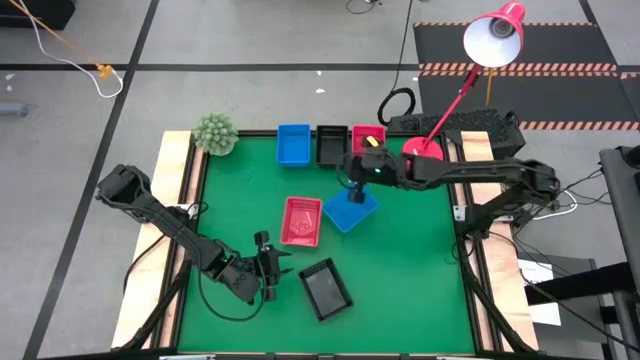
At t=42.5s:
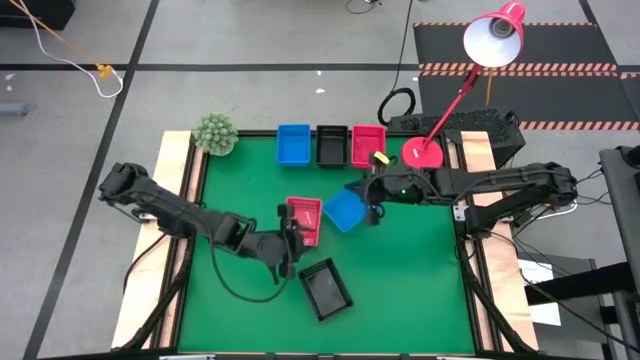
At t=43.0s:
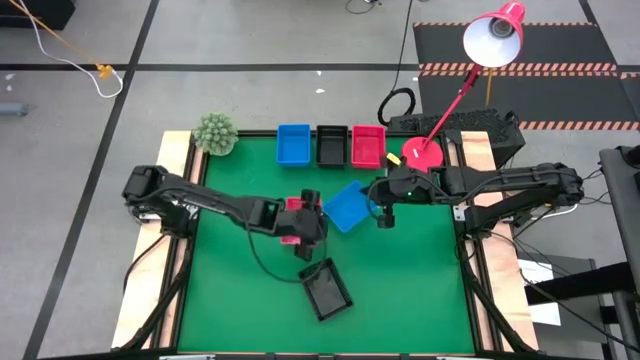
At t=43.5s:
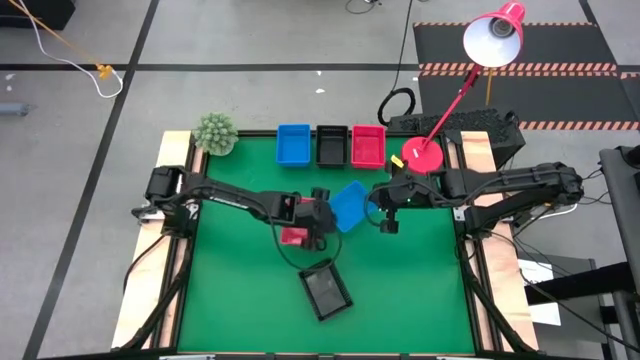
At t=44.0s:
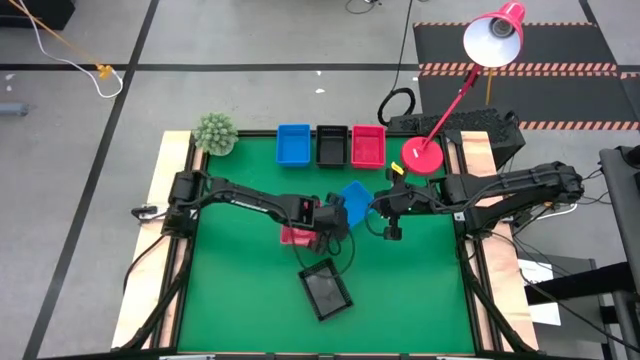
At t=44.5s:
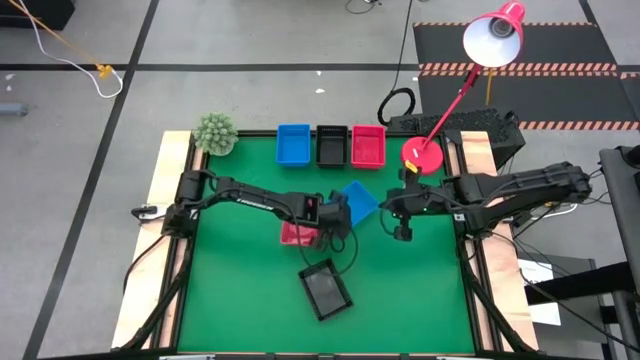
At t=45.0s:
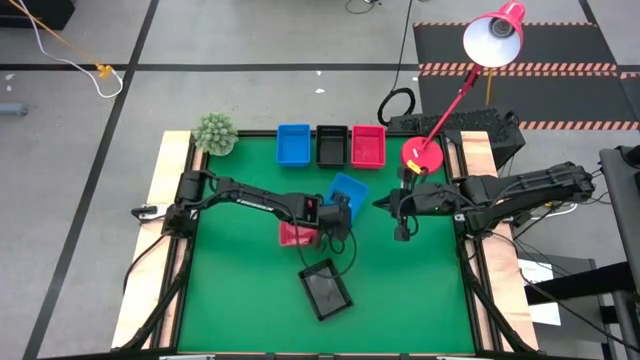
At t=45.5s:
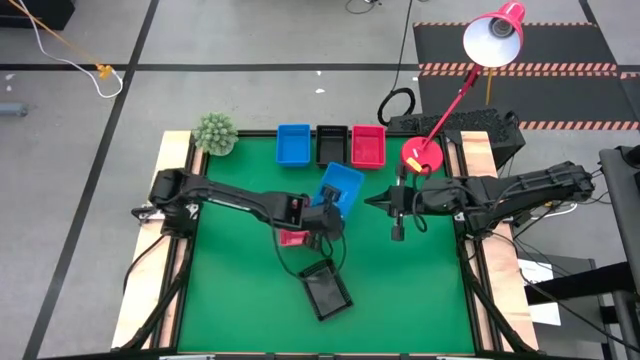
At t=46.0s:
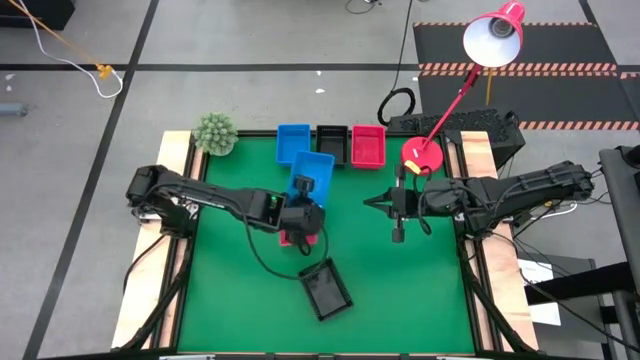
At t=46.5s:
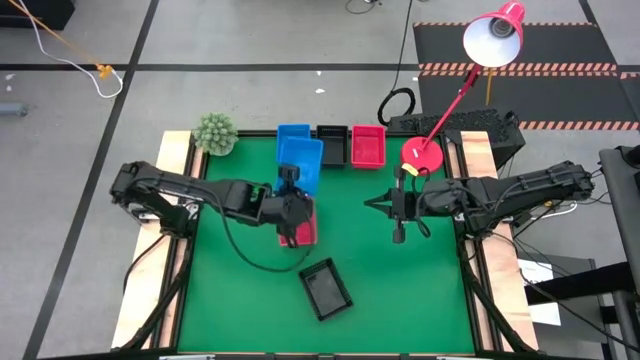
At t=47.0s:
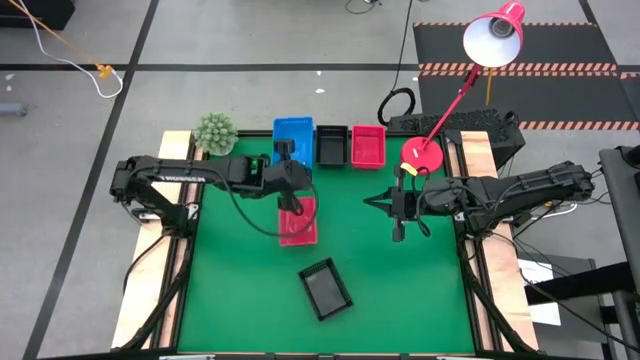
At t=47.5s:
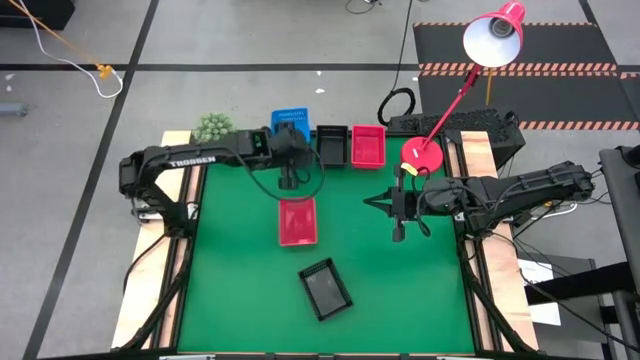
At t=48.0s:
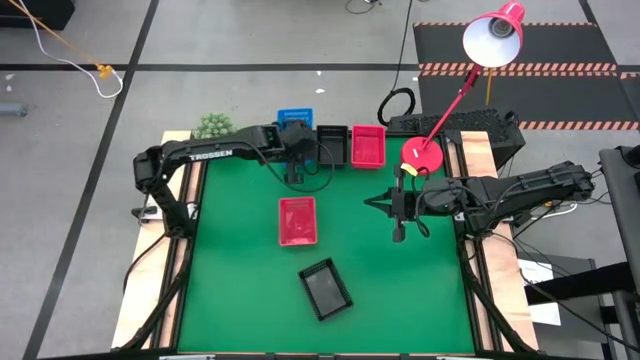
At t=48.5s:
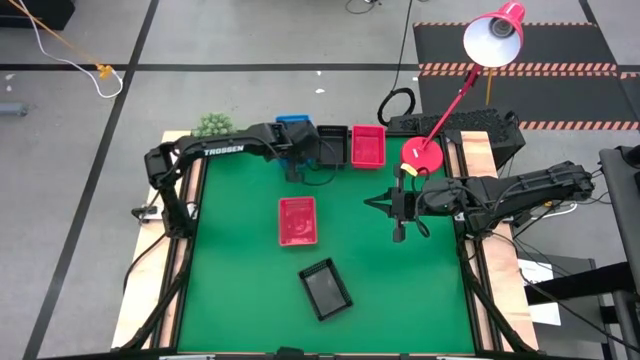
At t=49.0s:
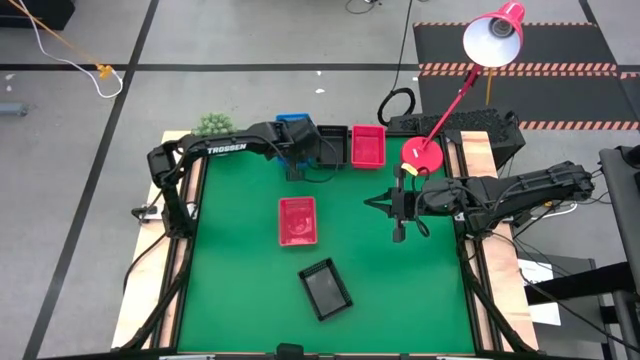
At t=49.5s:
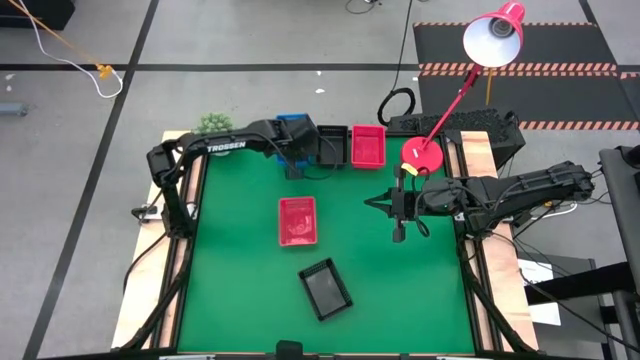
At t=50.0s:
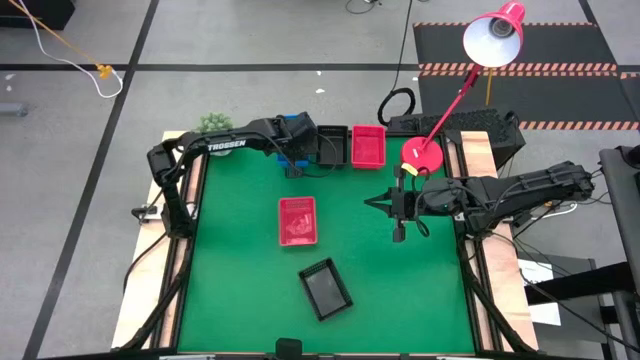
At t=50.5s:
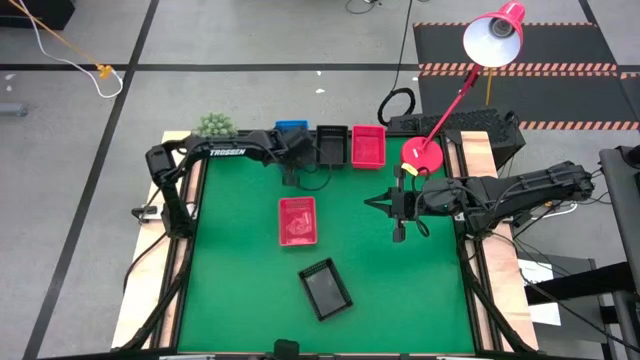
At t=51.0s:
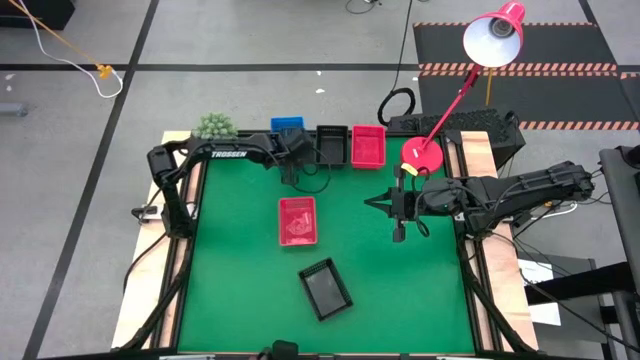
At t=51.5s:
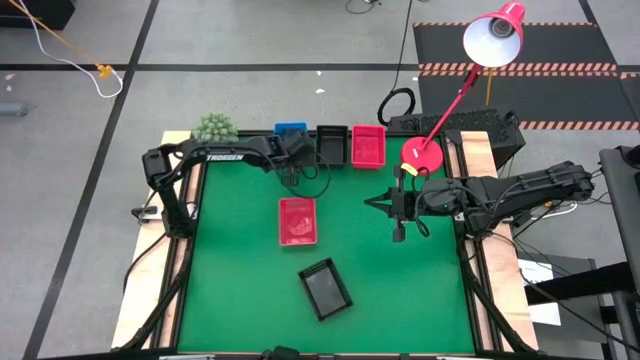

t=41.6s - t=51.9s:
Stack the bottom blue basket on the stacked top blue basket

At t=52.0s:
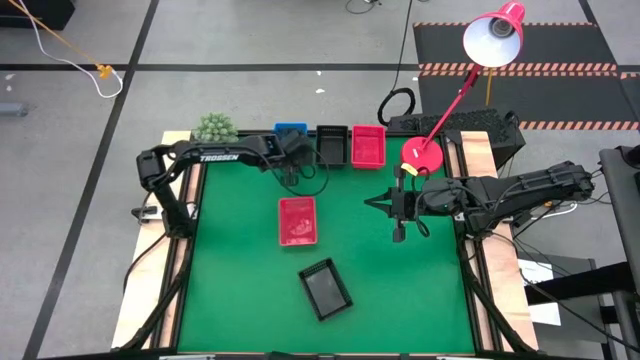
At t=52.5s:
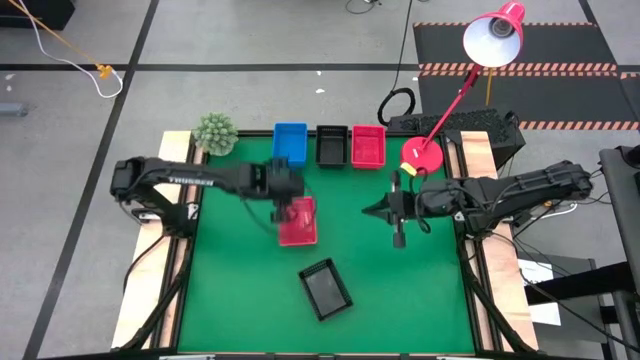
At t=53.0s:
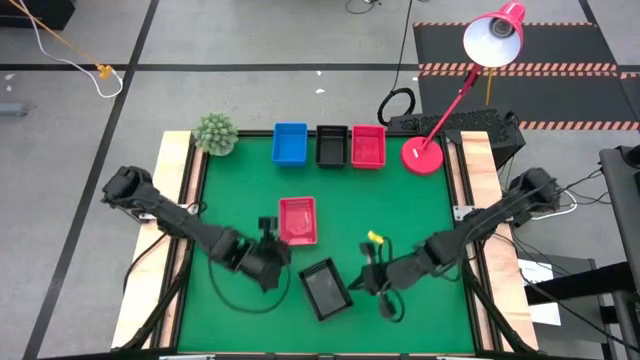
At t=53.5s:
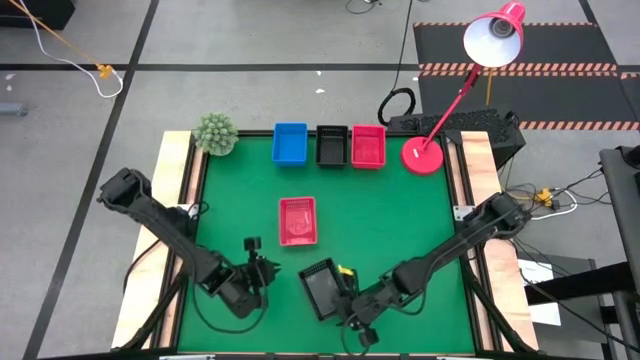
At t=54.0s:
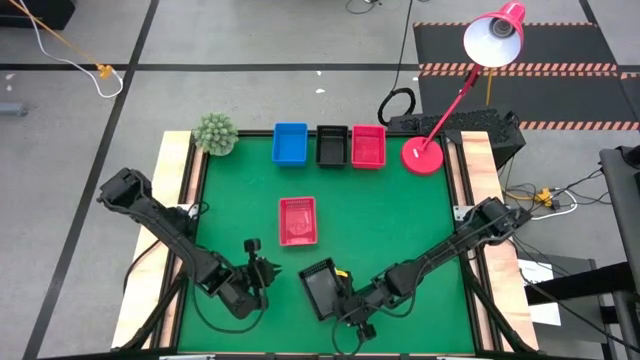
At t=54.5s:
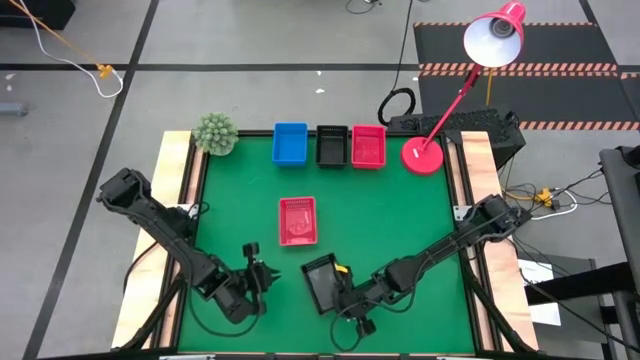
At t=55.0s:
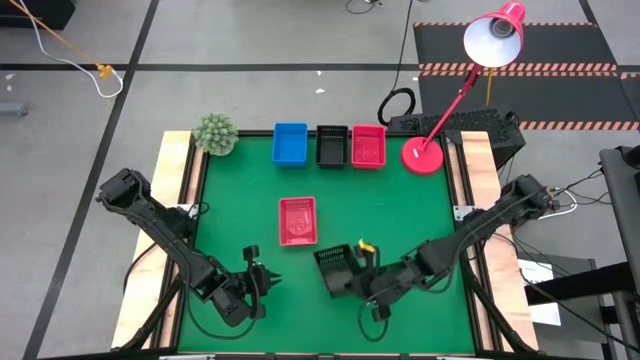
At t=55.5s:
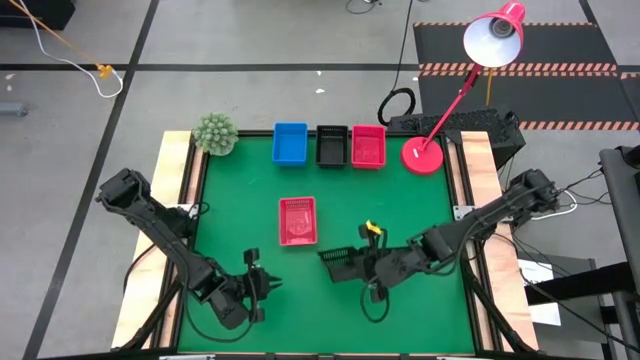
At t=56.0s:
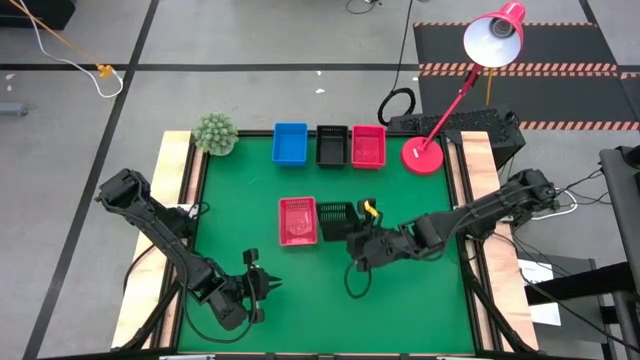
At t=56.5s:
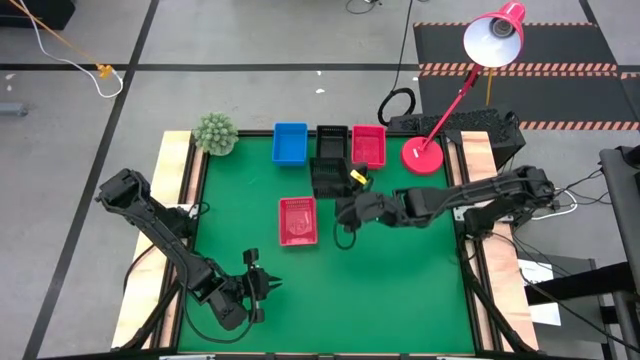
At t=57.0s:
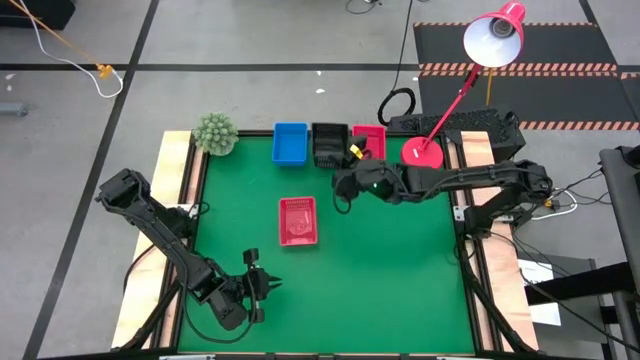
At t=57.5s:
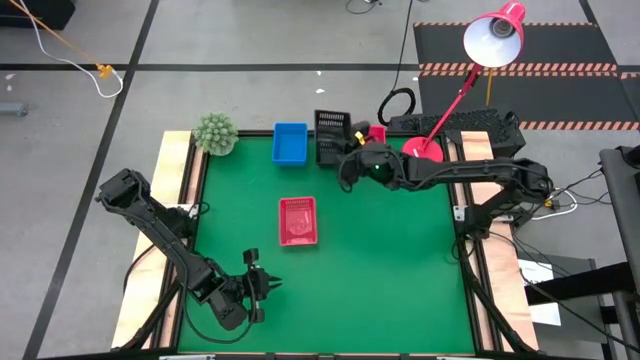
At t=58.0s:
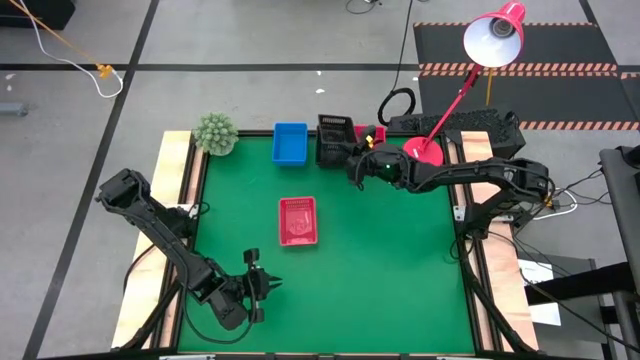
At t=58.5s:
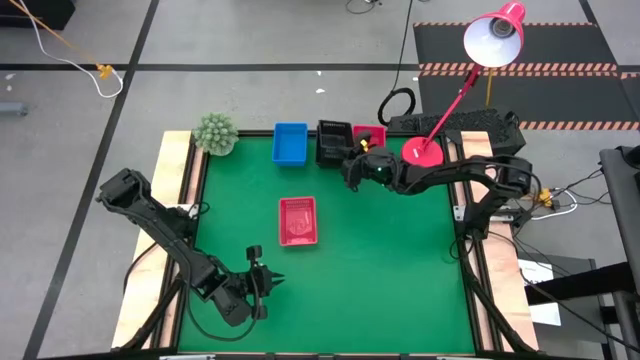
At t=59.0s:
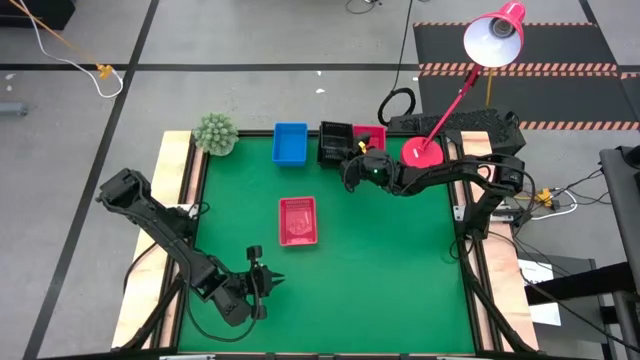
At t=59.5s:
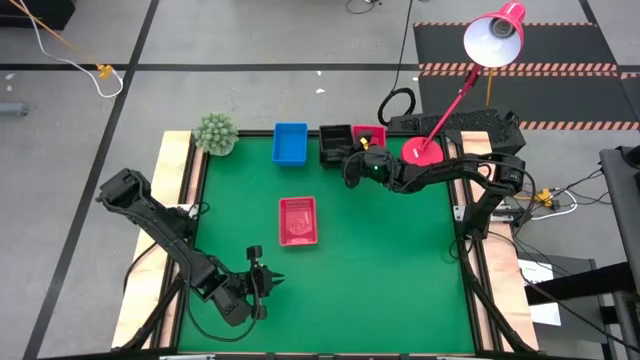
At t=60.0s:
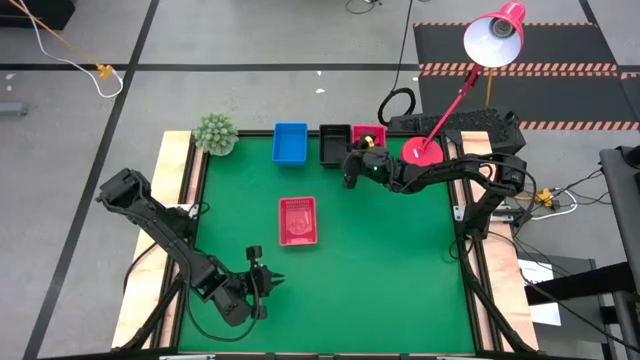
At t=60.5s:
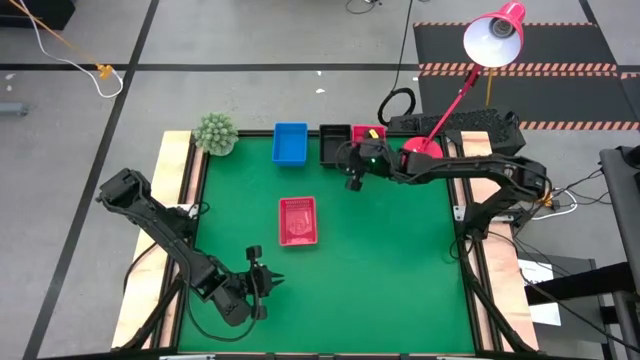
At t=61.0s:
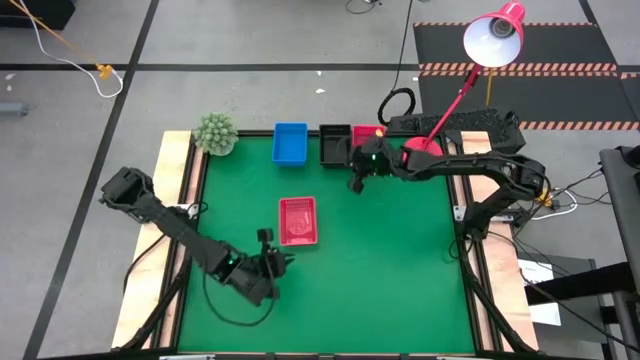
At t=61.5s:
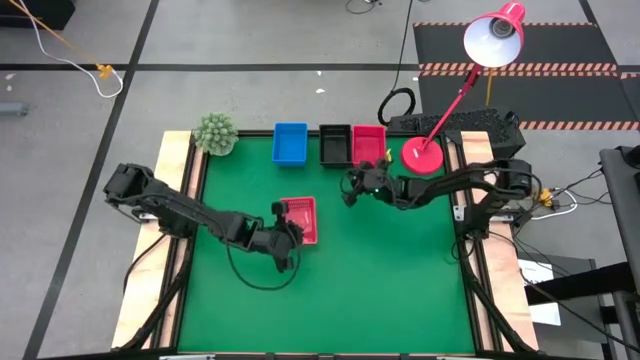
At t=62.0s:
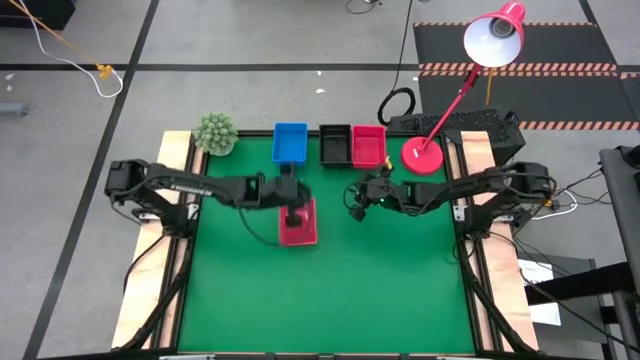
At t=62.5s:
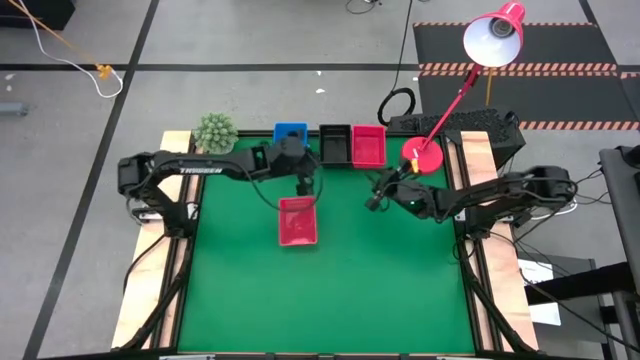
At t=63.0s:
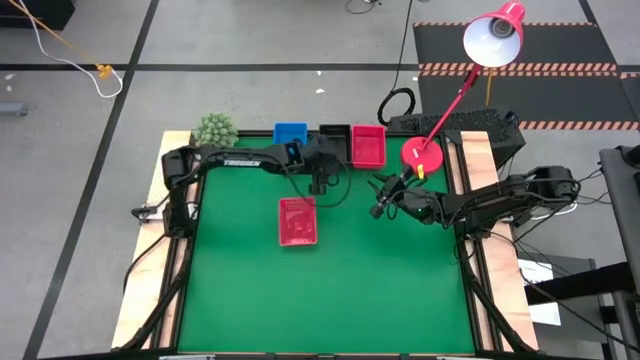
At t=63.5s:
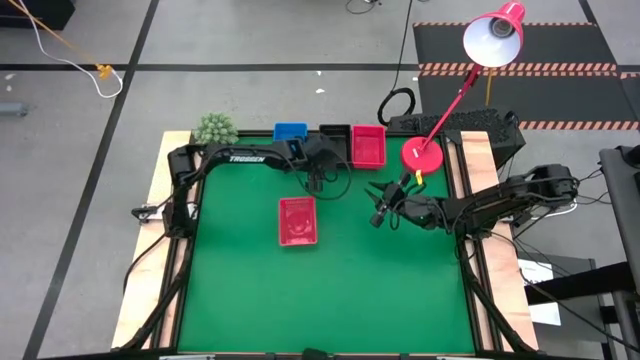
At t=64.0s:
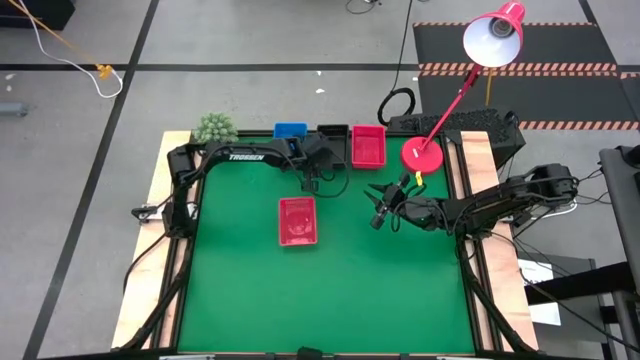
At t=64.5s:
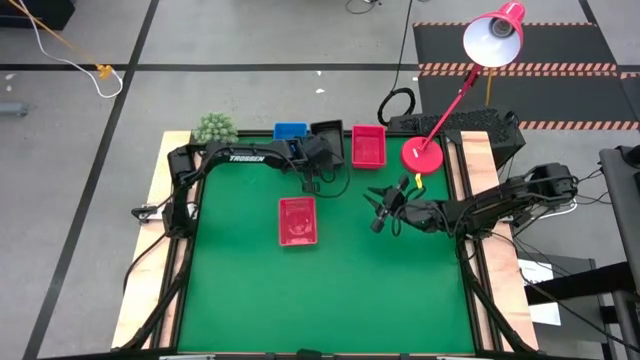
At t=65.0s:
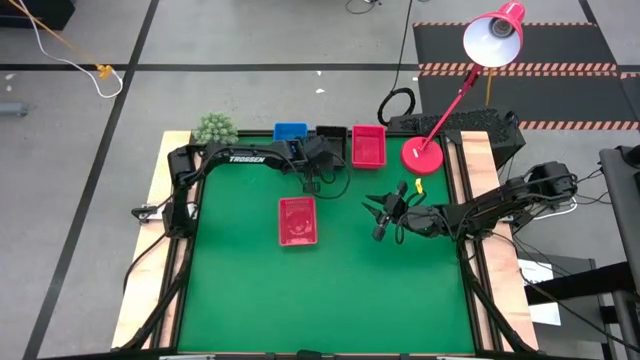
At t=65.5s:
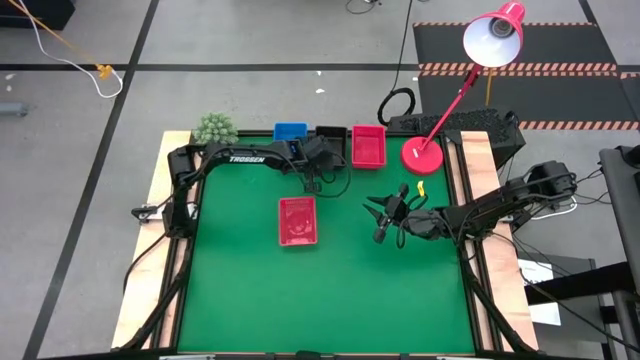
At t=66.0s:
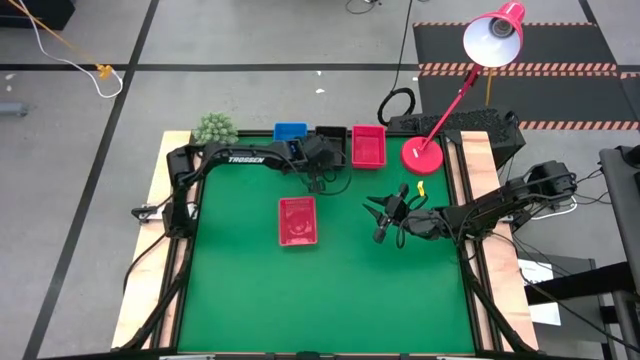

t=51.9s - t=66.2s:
Stack the bottom black basket on the stacked top black basket
